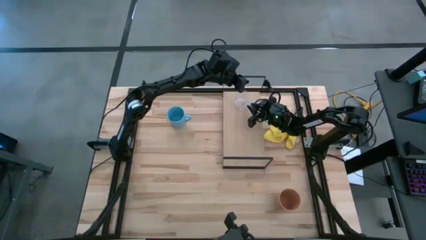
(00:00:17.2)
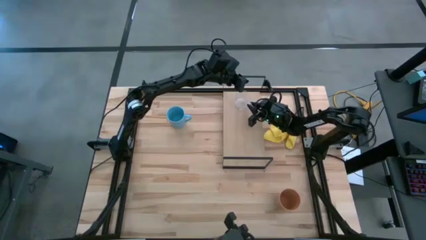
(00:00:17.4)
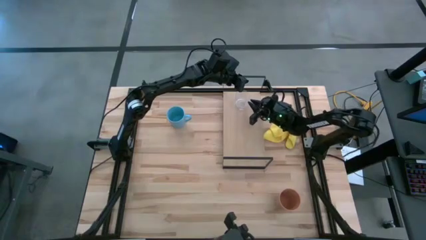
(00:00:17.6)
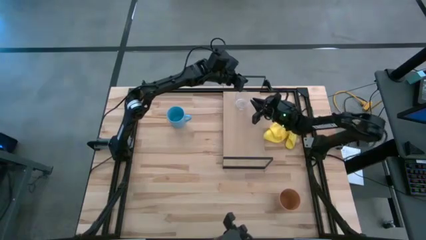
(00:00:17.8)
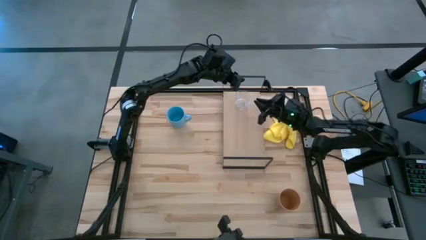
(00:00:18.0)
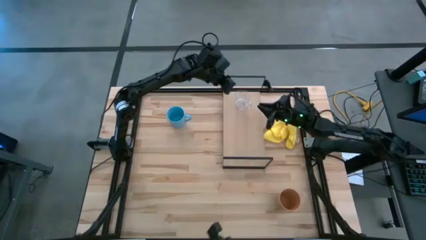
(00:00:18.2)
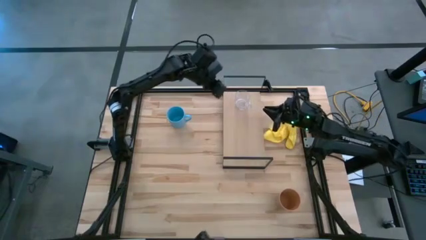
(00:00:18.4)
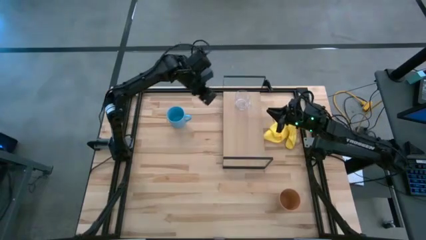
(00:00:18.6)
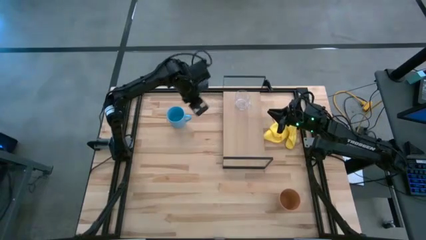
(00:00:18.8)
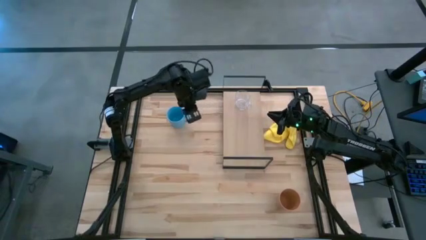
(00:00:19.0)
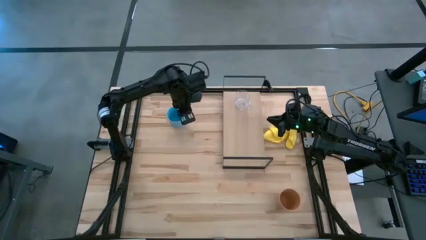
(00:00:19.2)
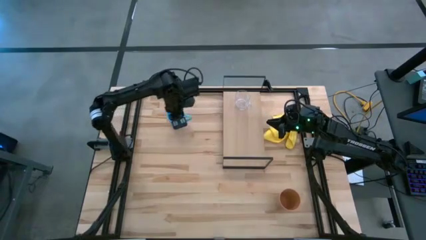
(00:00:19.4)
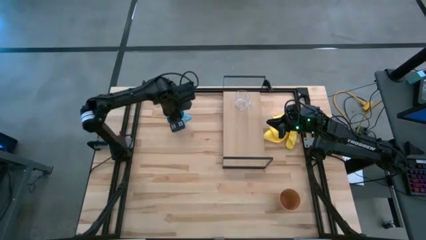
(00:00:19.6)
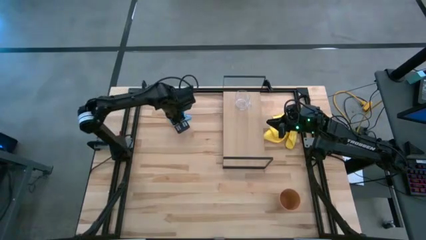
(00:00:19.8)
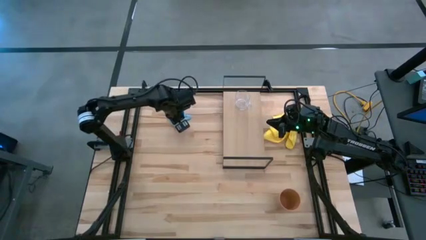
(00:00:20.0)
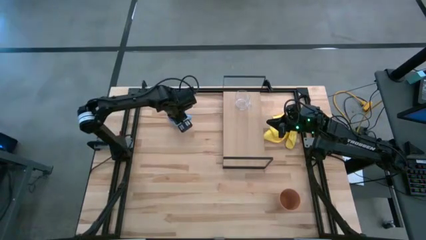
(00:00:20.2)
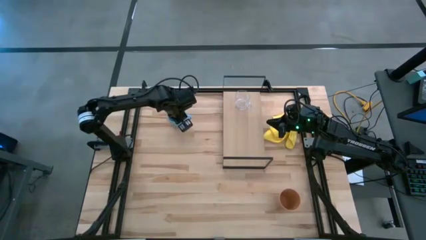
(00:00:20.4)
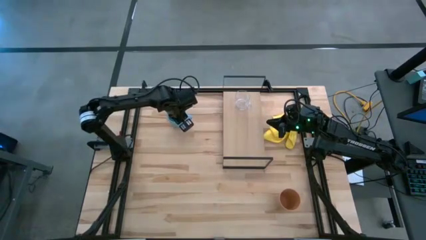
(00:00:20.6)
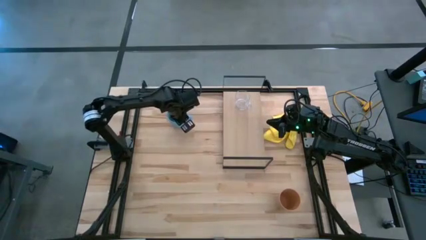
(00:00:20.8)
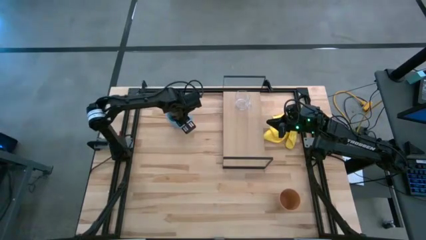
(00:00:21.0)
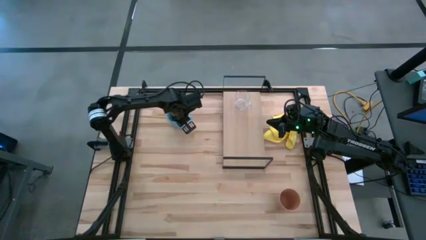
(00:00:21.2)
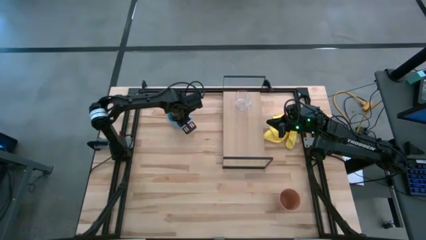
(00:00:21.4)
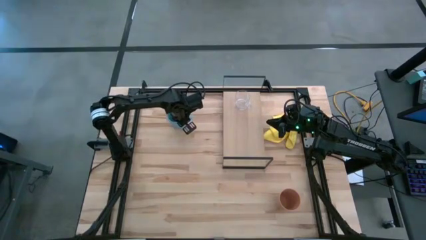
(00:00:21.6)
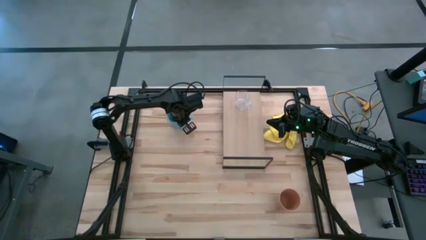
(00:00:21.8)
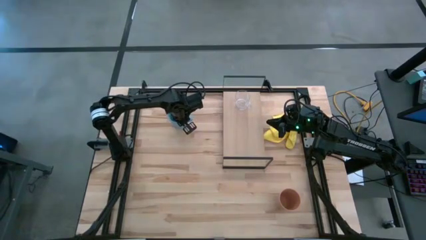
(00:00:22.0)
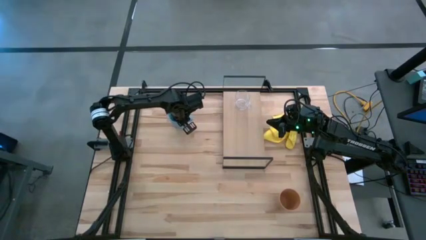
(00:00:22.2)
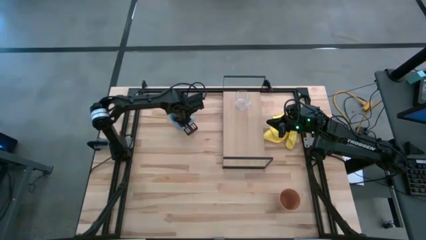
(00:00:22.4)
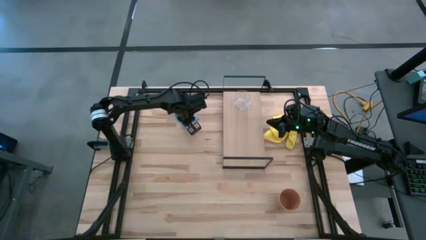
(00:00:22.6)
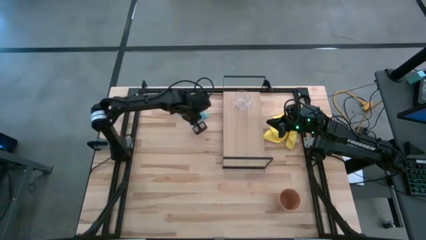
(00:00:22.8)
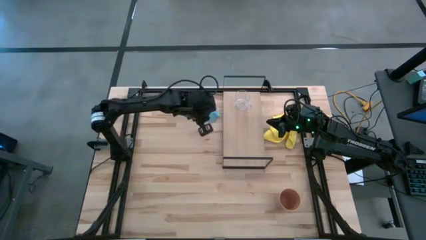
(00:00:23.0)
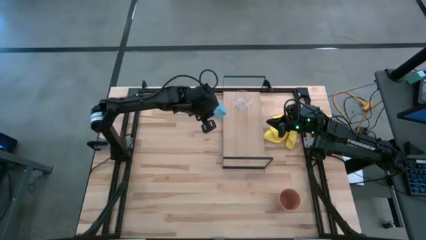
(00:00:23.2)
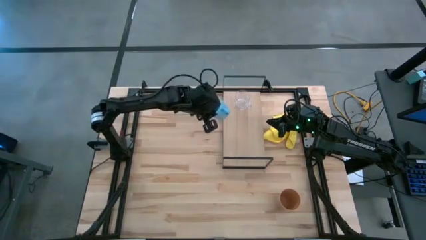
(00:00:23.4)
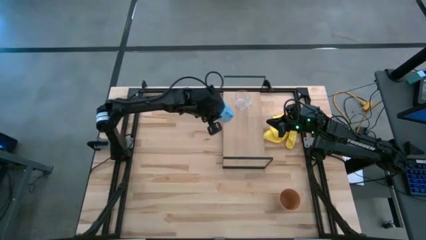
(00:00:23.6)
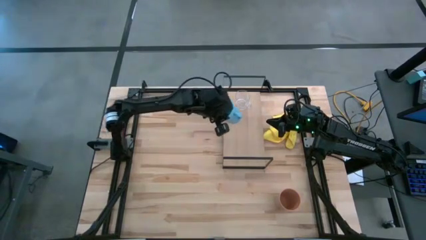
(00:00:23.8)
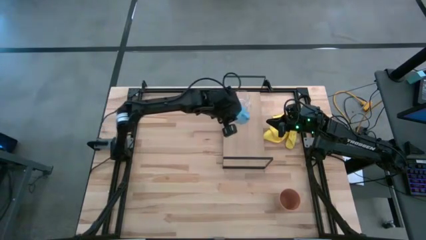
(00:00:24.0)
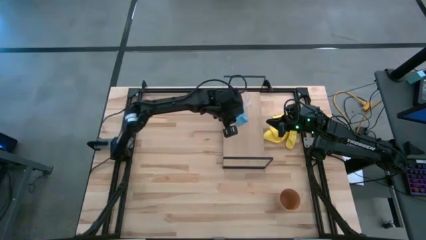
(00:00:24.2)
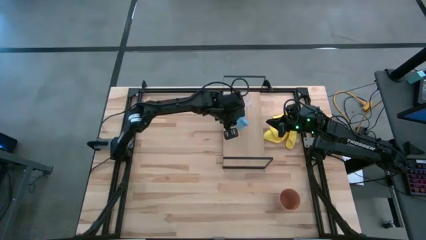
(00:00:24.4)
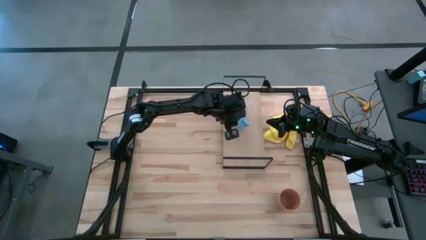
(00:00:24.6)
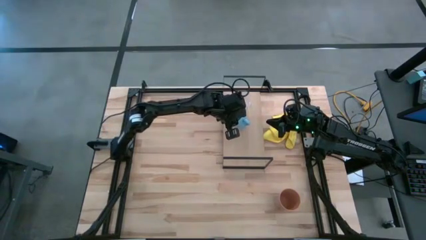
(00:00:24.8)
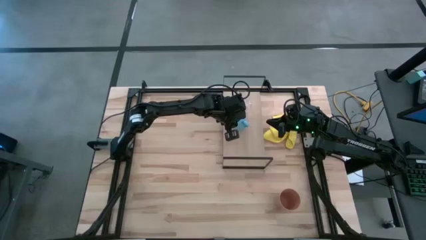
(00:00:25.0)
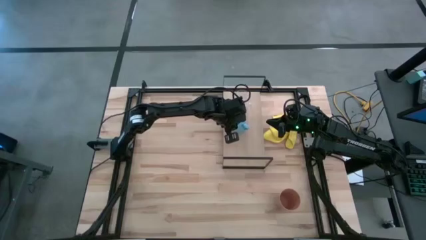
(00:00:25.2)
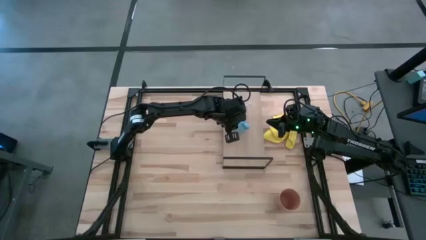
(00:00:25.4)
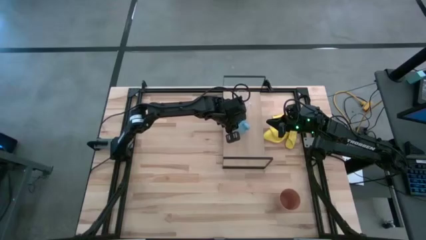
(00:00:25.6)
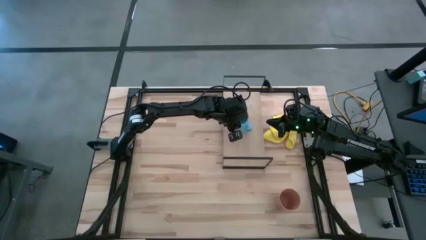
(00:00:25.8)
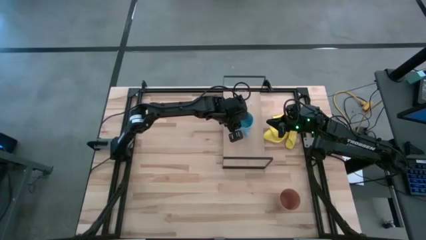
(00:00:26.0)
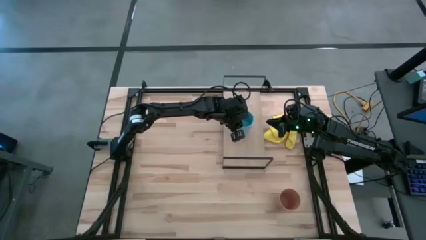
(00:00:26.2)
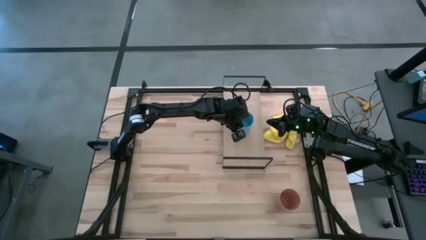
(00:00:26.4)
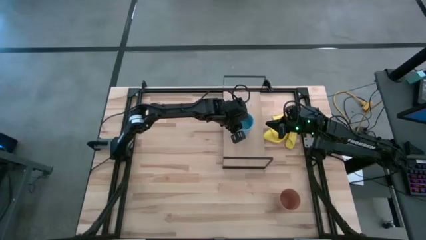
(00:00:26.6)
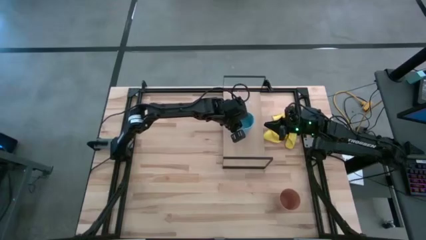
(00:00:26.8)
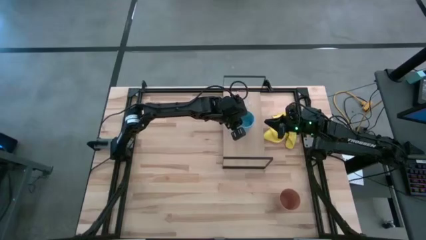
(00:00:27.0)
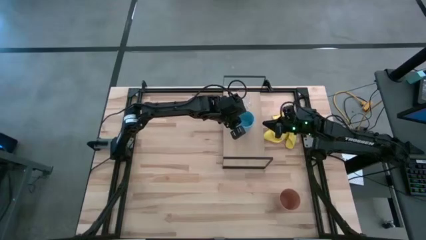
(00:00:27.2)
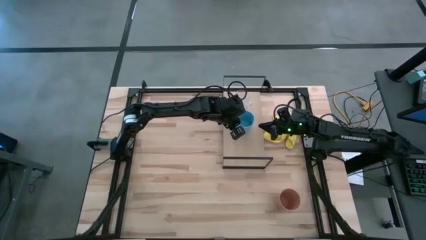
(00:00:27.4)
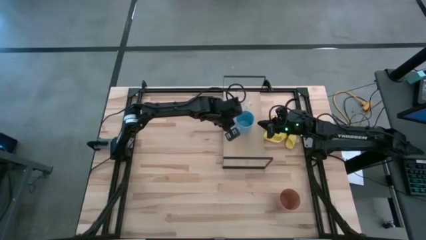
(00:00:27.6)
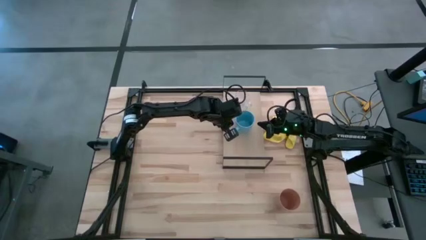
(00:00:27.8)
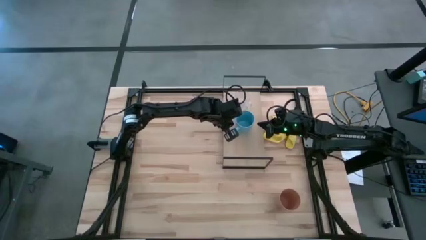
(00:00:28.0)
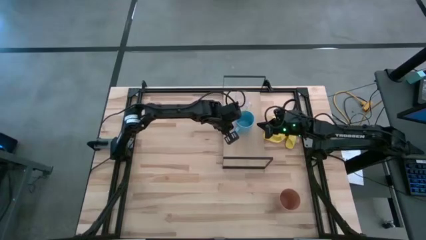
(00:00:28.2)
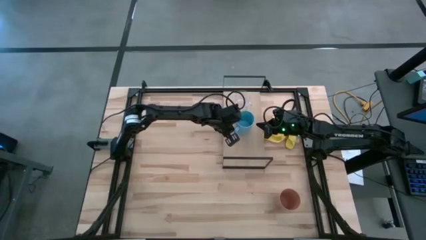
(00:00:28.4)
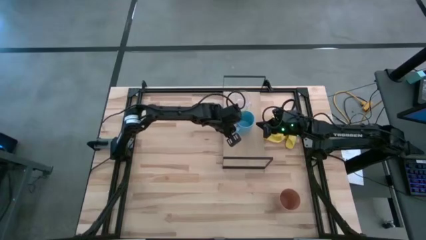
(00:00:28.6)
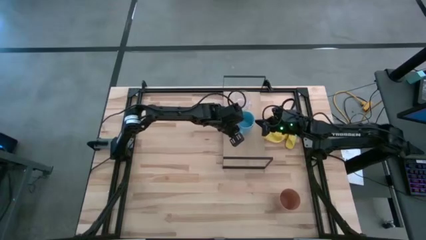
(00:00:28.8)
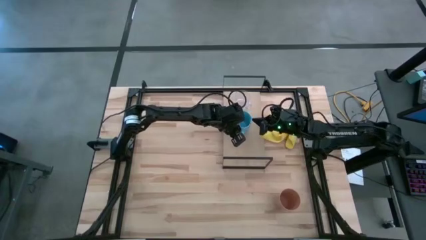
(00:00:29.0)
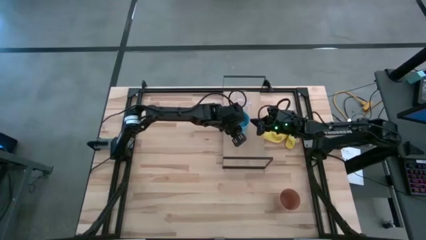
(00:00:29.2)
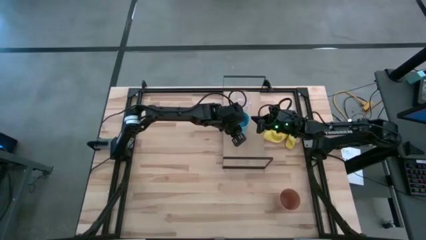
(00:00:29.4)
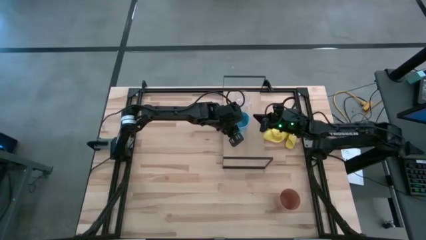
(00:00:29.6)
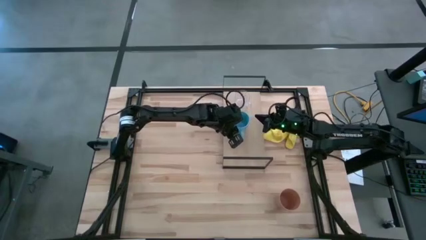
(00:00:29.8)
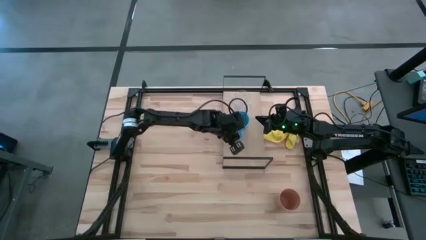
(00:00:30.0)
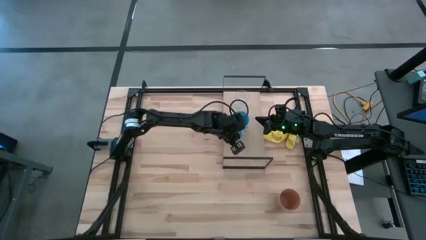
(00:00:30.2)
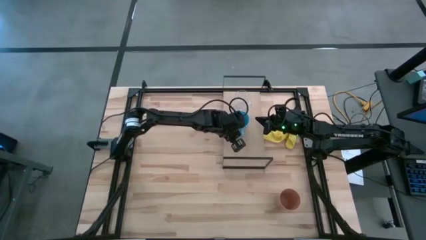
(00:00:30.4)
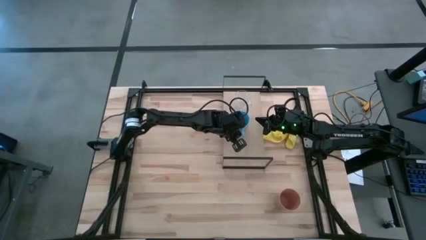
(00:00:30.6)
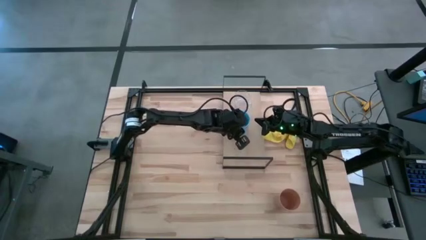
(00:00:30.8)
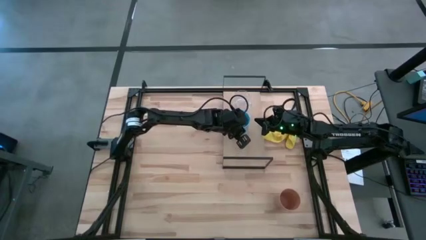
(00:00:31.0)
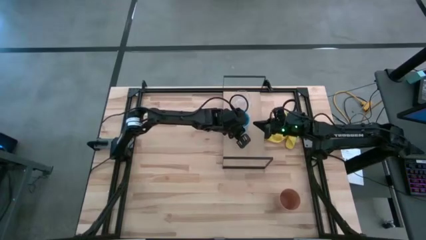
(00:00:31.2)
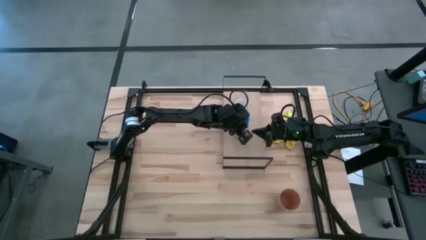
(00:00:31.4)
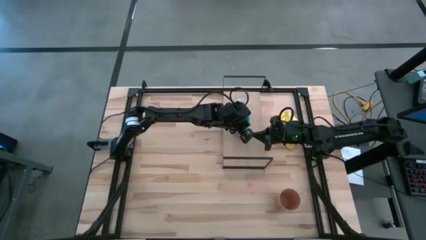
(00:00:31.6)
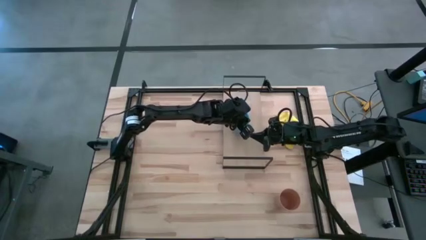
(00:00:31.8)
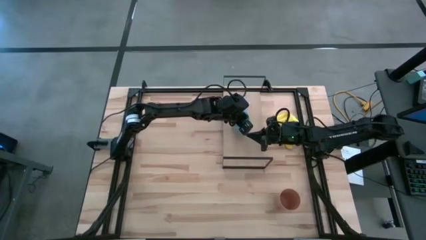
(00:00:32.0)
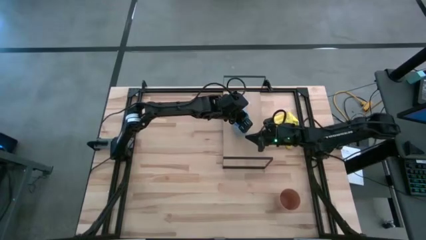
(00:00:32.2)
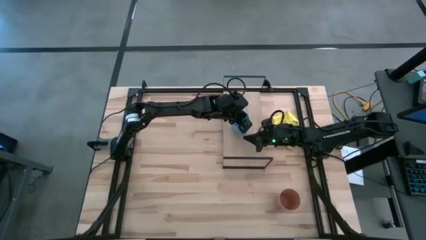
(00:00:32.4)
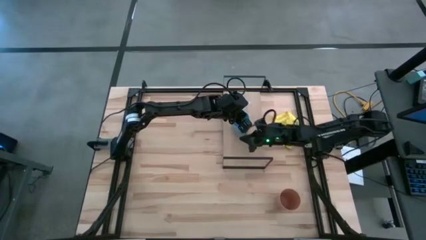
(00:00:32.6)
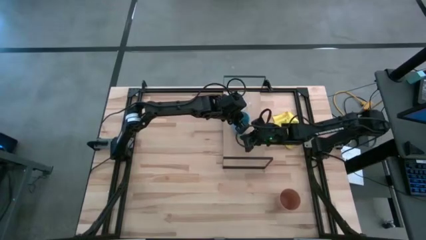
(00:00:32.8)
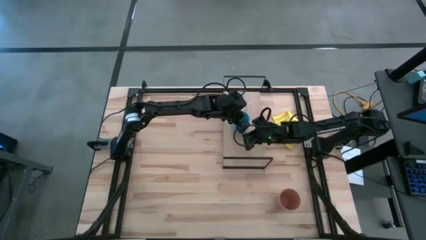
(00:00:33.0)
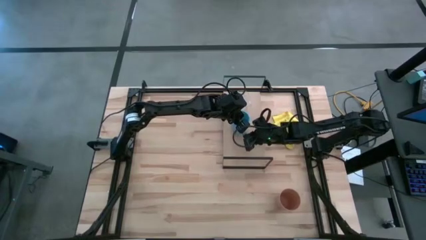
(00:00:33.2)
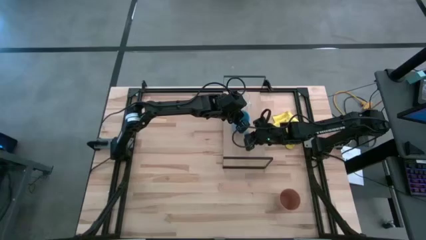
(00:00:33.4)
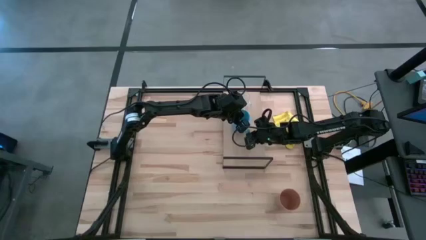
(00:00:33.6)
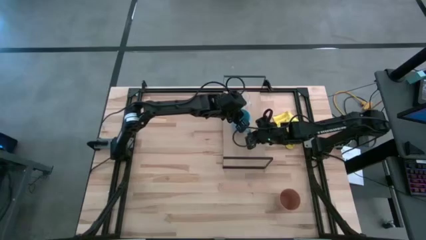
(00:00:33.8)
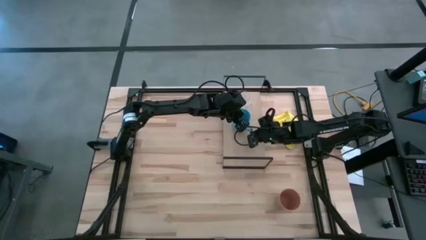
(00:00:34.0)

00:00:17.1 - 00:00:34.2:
Task: Stack small to large cups/mugs on shelf
Put the blue mug on the shelf
